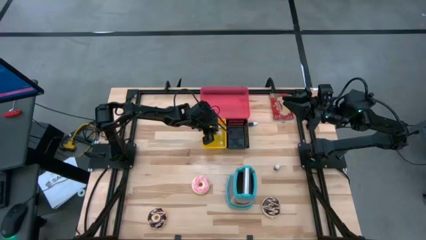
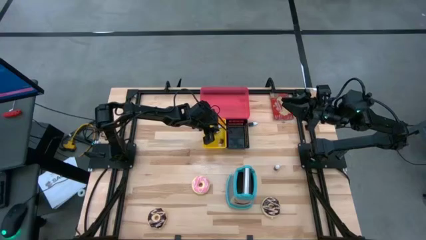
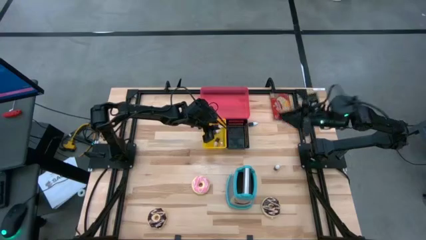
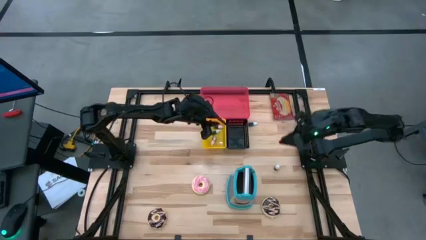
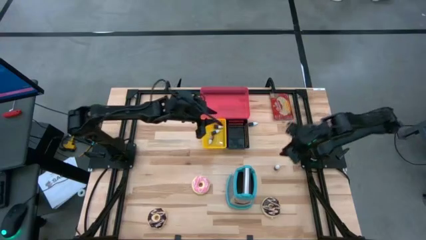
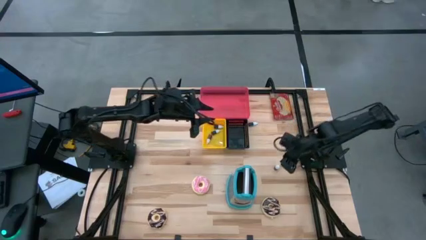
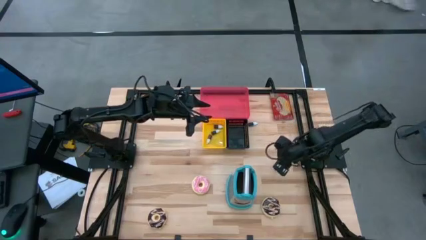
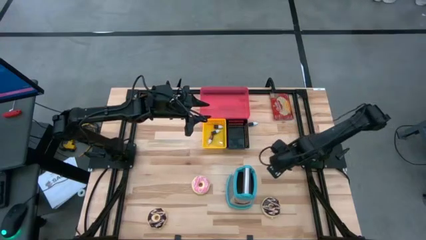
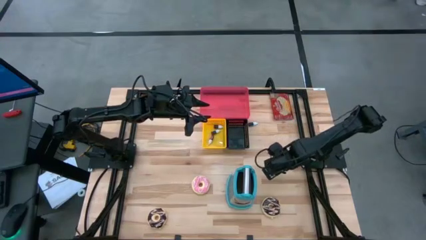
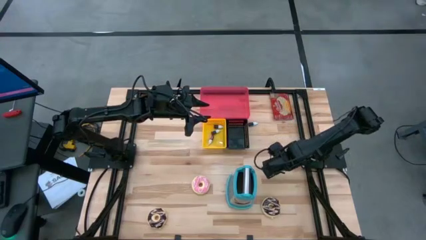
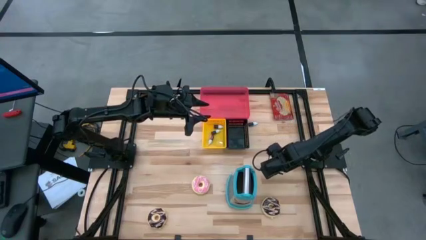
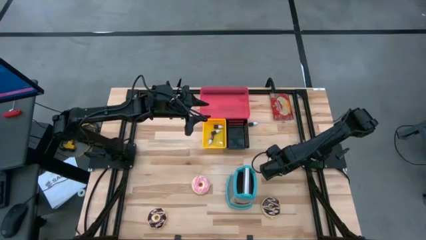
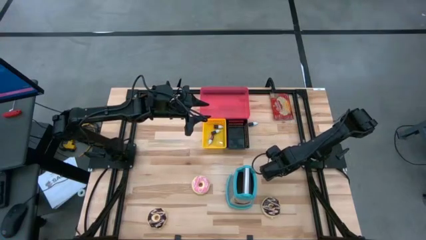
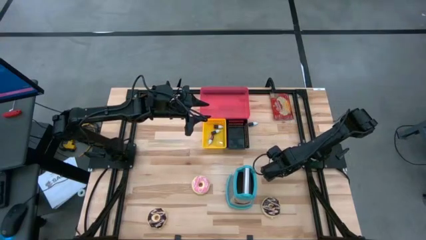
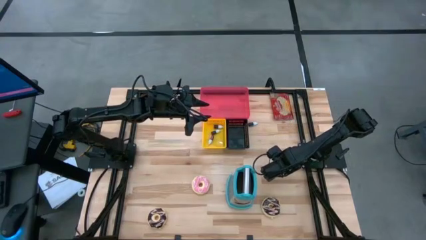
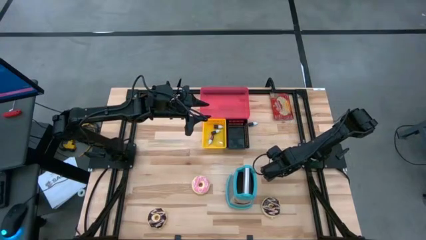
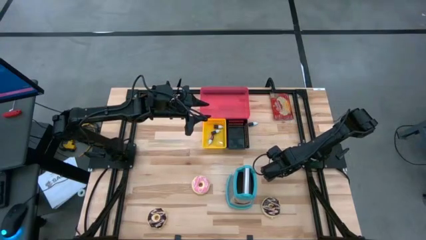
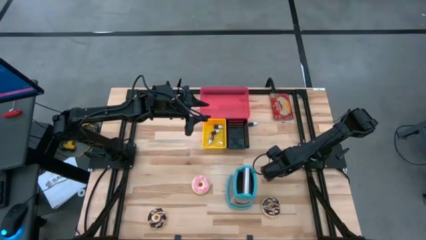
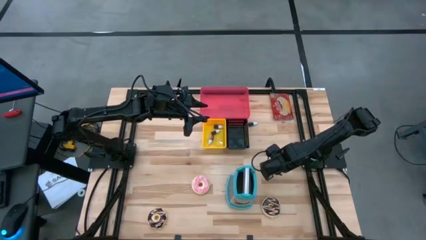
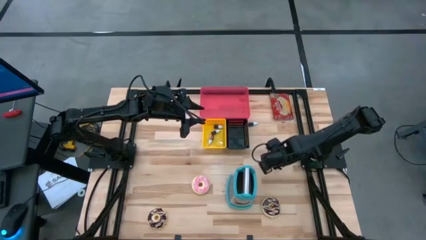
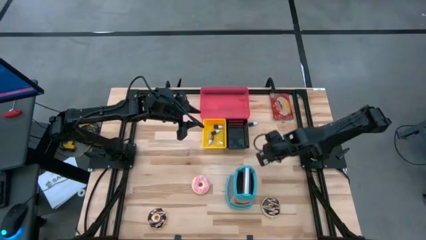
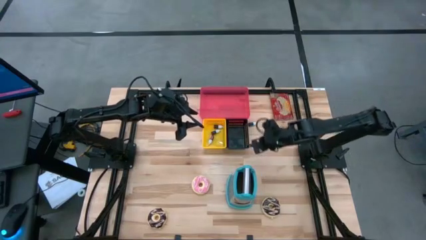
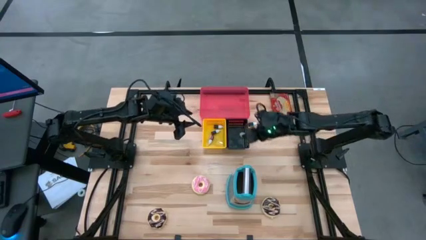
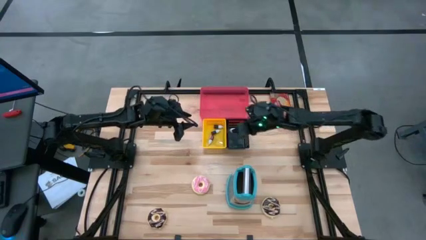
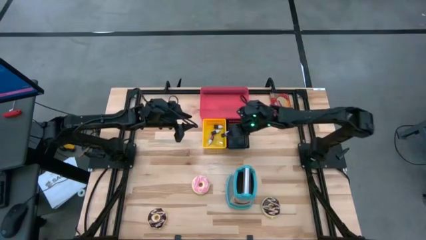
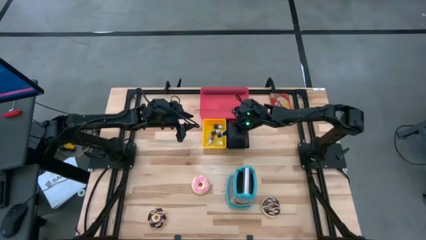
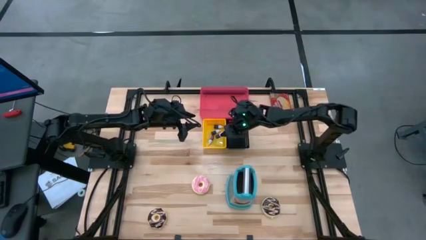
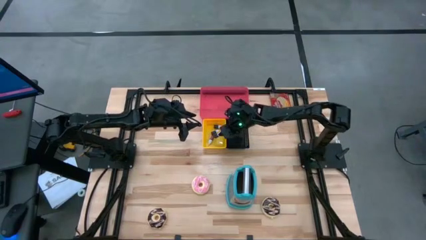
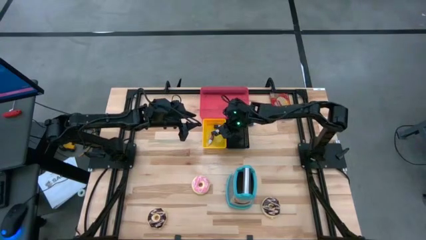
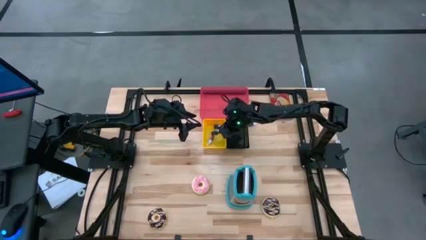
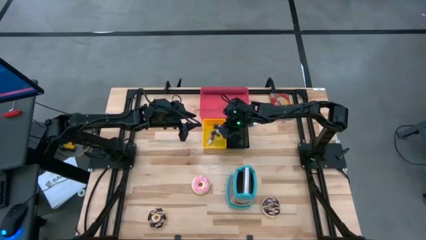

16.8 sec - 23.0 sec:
Put the red food coloring bottle into the yellow bin

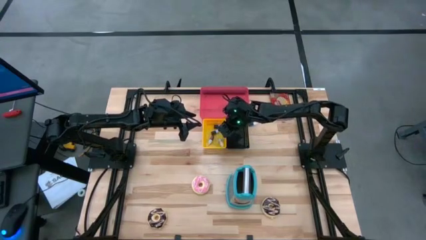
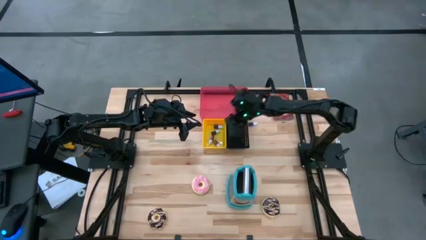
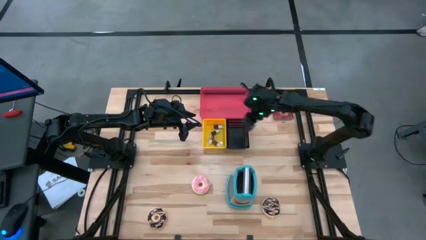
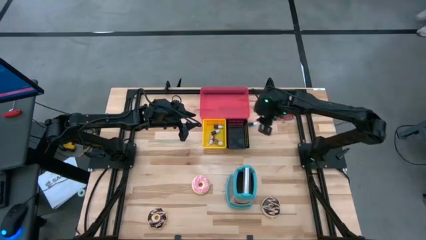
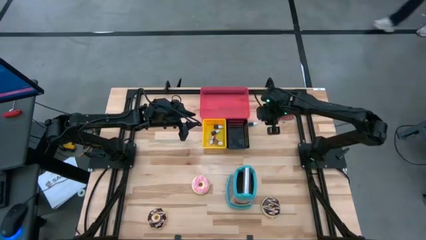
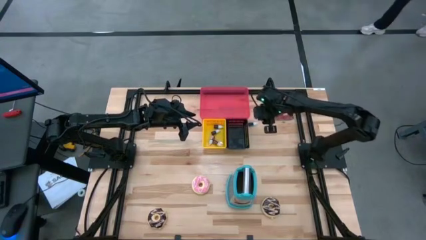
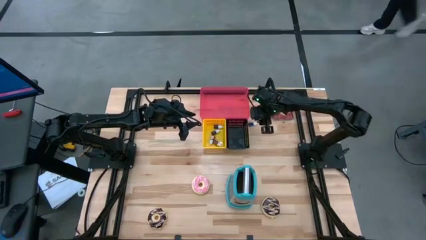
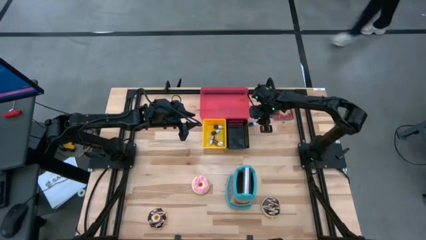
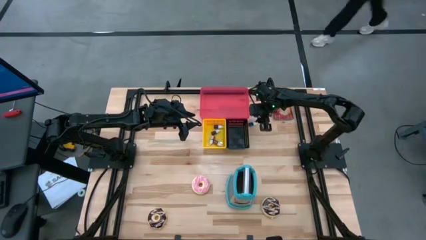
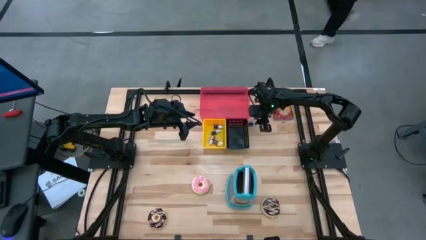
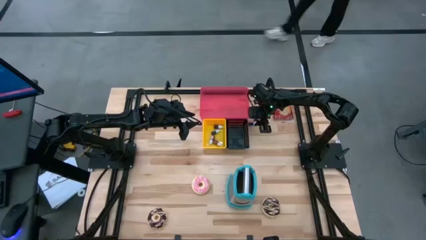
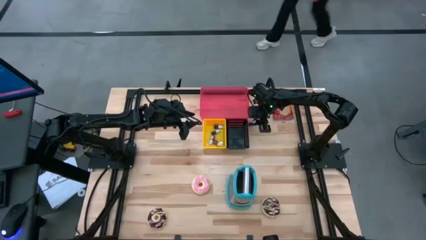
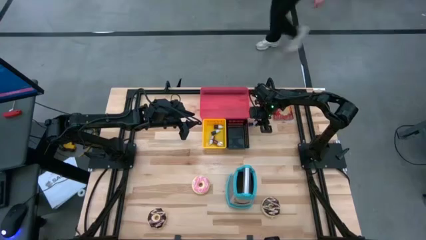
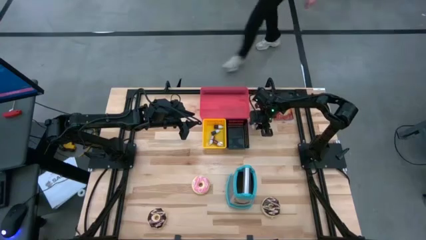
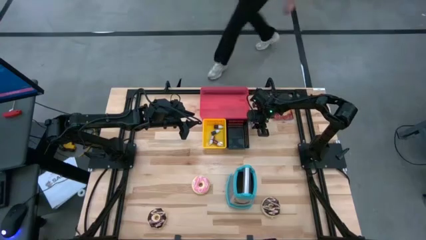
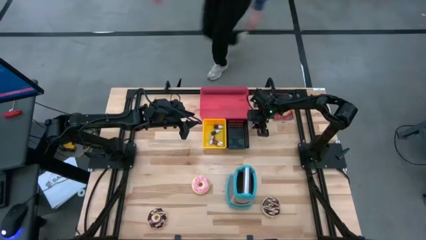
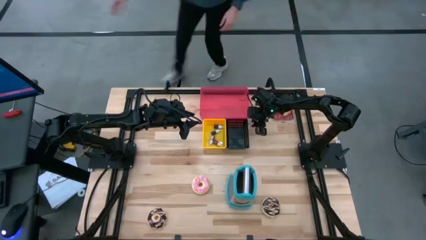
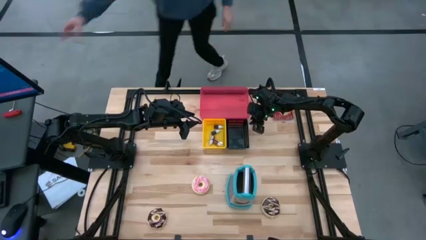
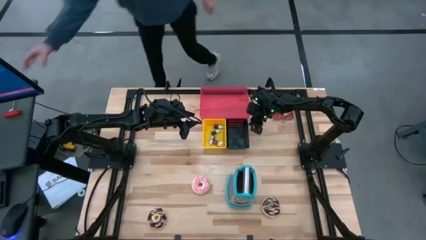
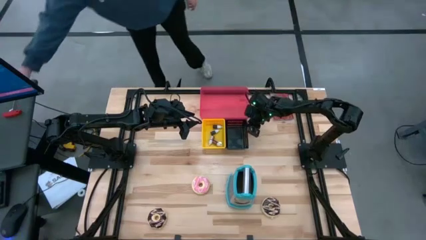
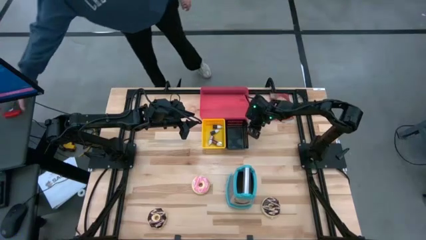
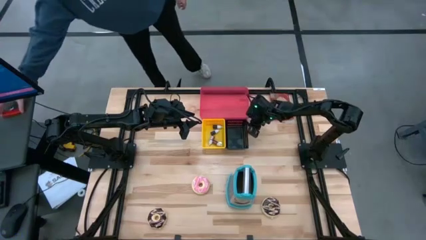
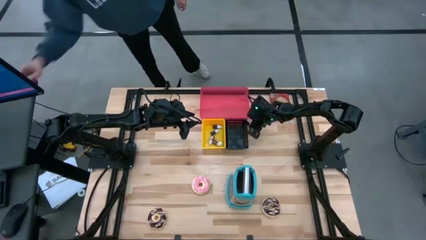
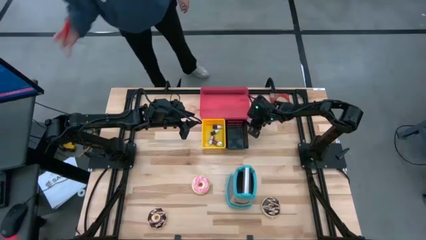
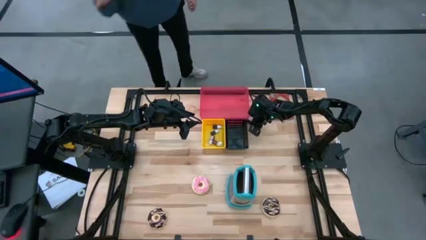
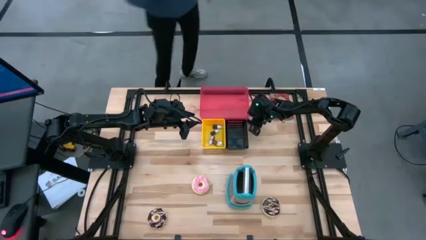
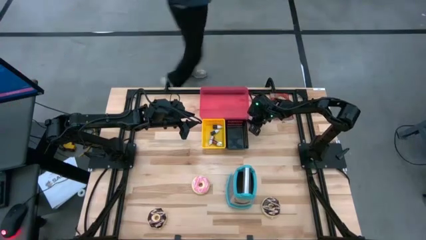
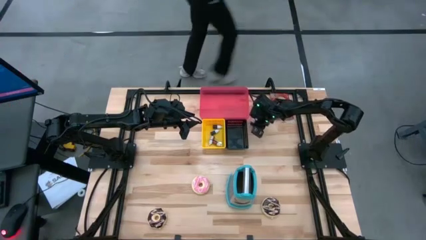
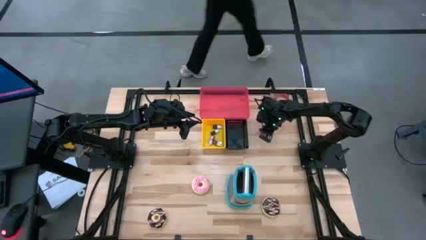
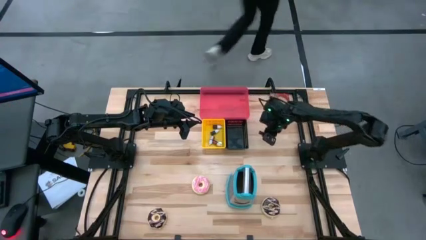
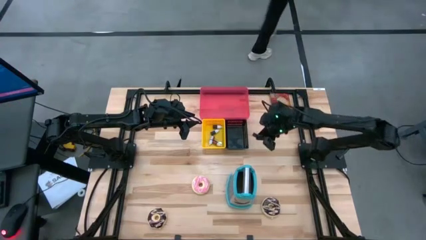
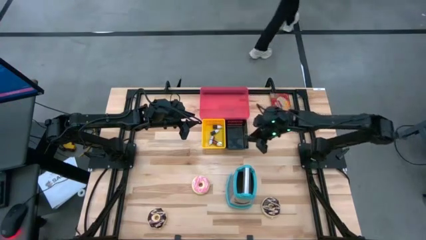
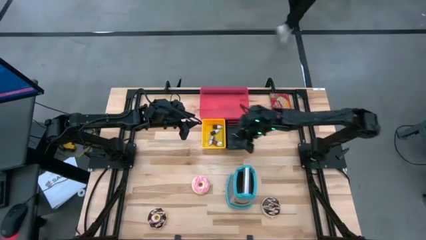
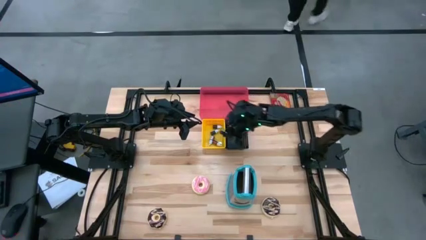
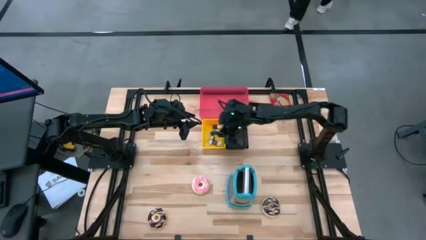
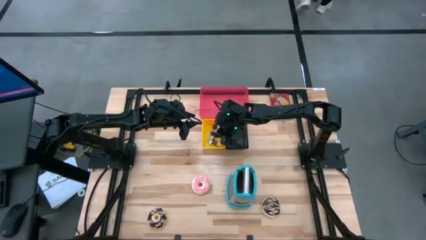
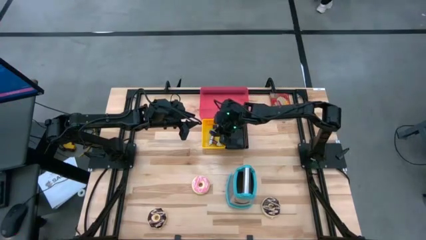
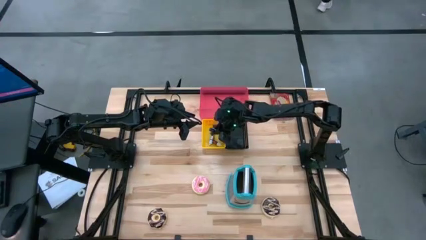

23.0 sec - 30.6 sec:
Put the blue food coloring bottle into the yellow bin
